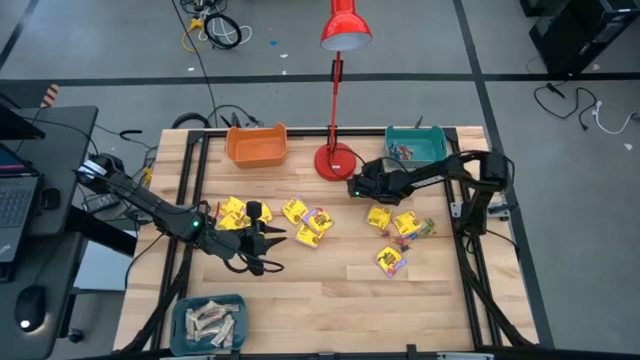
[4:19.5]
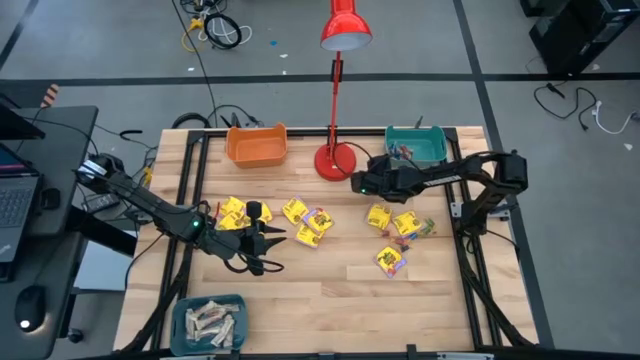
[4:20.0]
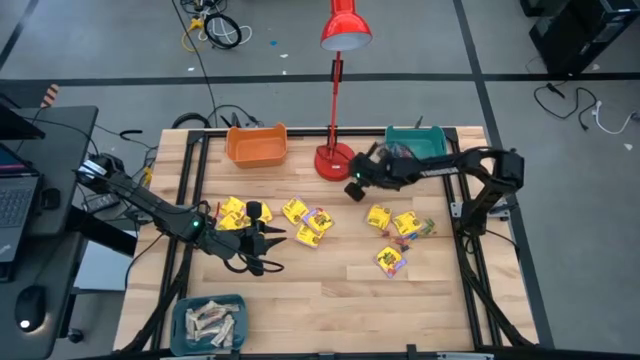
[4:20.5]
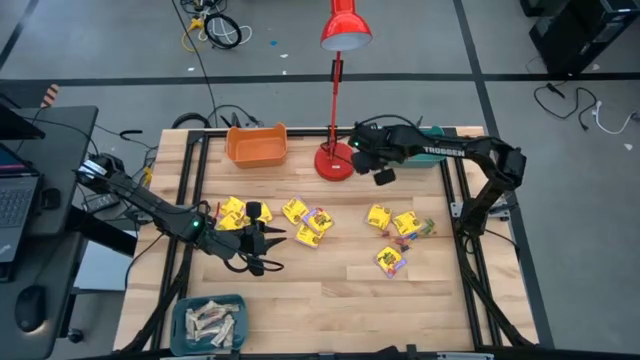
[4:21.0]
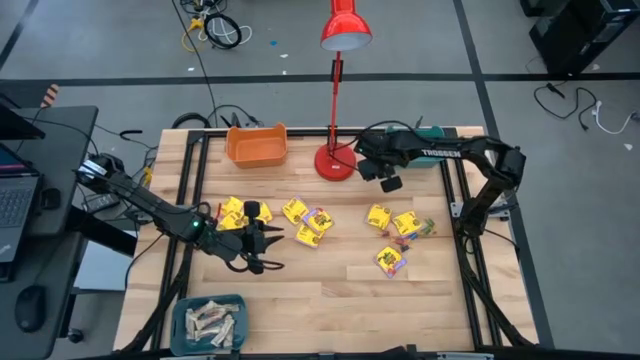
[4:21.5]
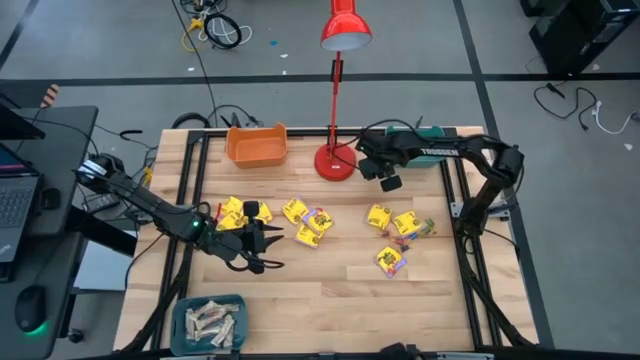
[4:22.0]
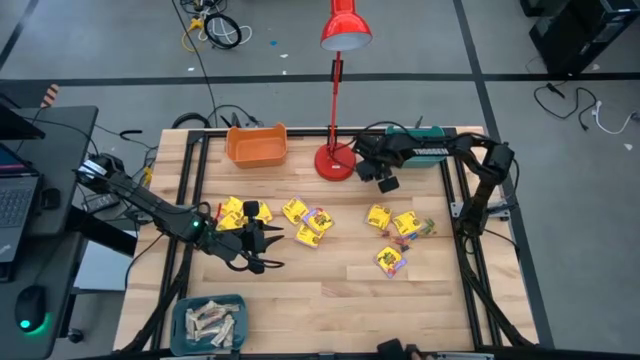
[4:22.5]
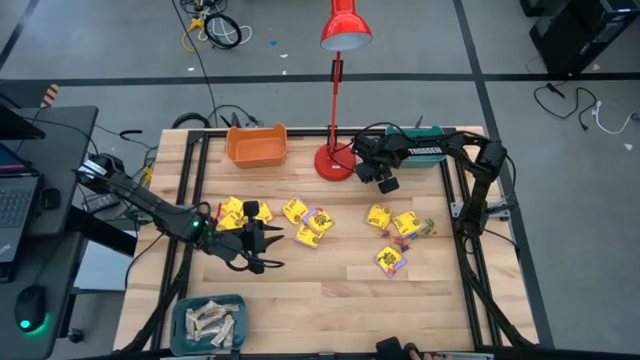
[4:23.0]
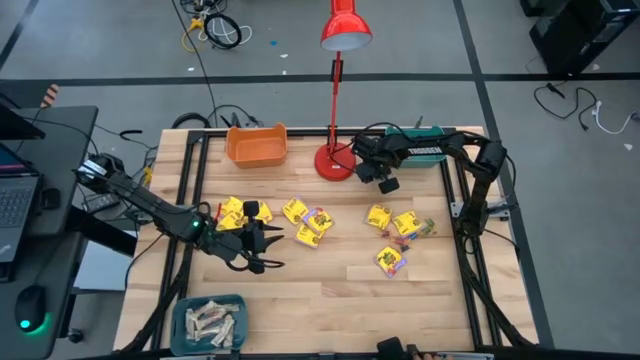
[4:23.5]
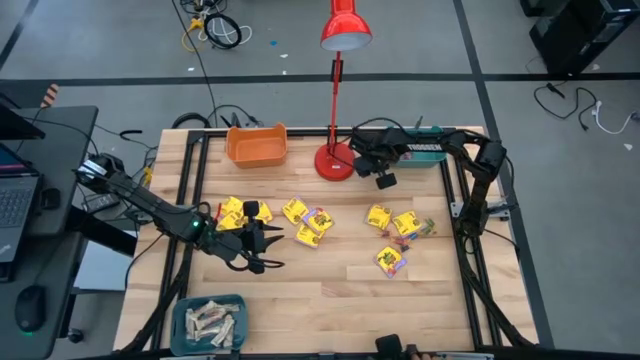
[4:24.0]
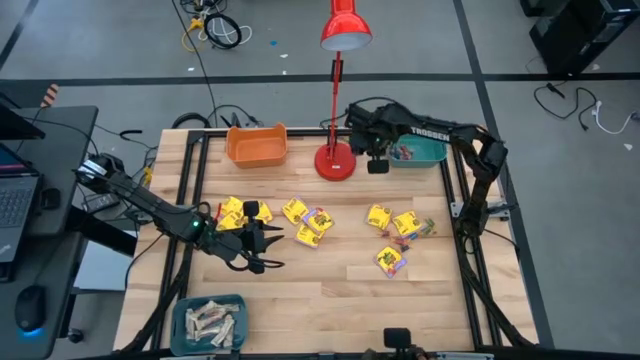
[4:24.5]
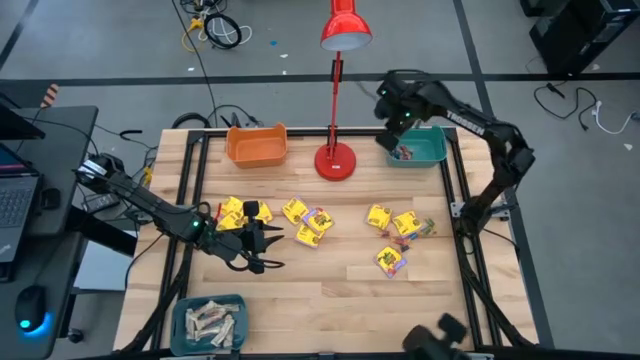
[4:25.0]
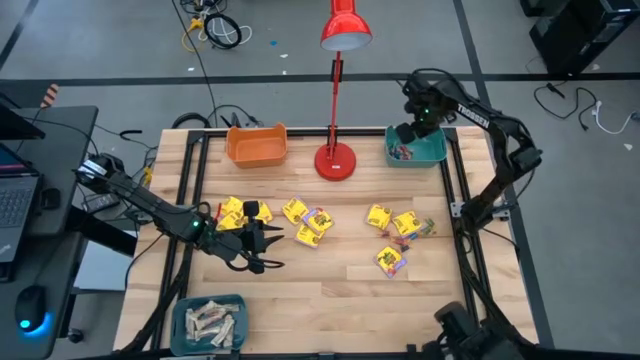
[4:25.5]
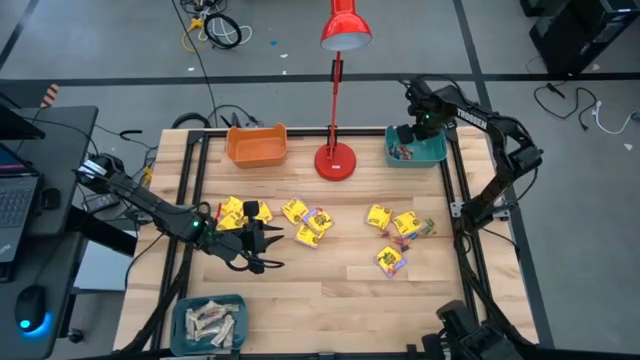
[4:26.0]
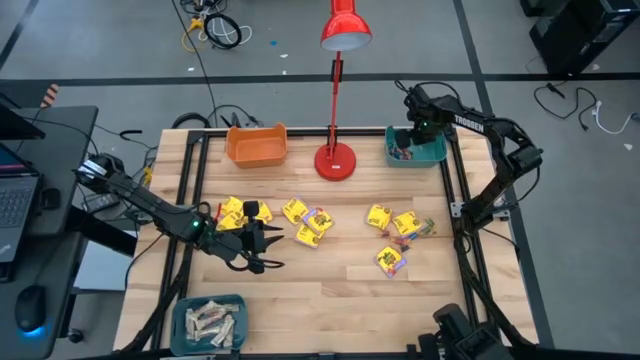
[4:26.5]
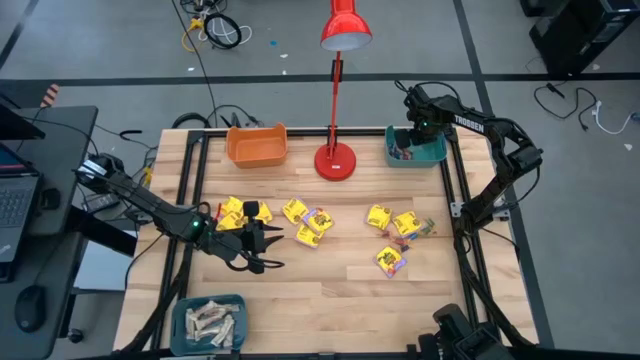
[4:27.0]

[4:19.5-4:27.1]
Task: Sort candy
Put the small blue candy into the green bin

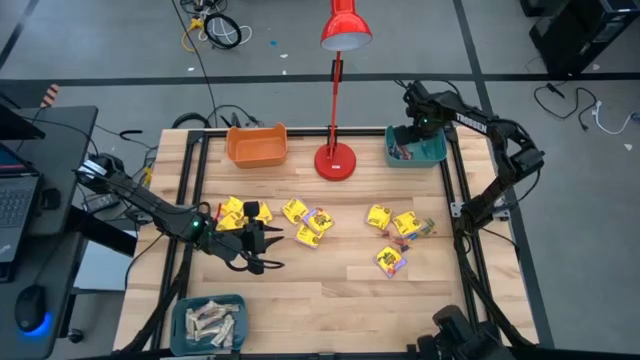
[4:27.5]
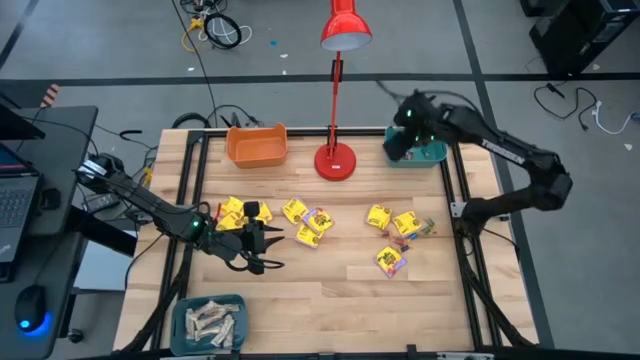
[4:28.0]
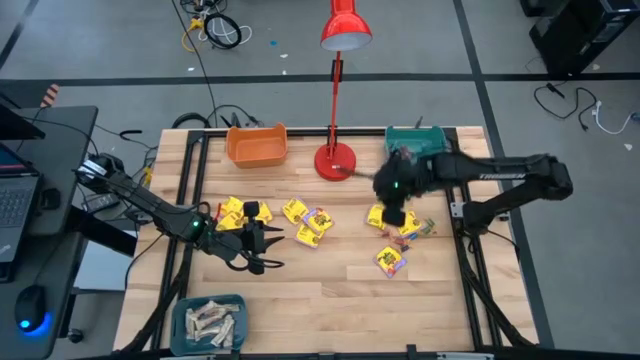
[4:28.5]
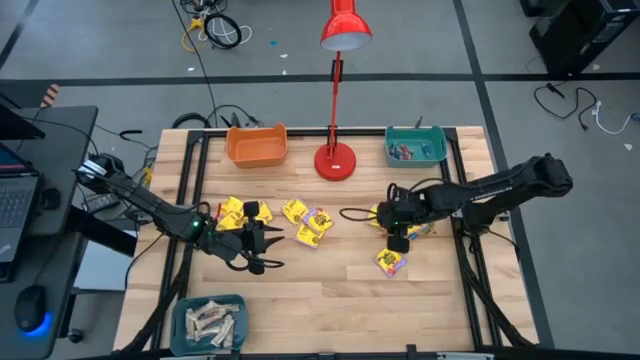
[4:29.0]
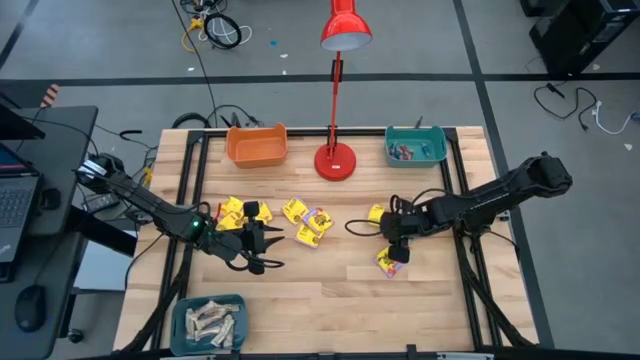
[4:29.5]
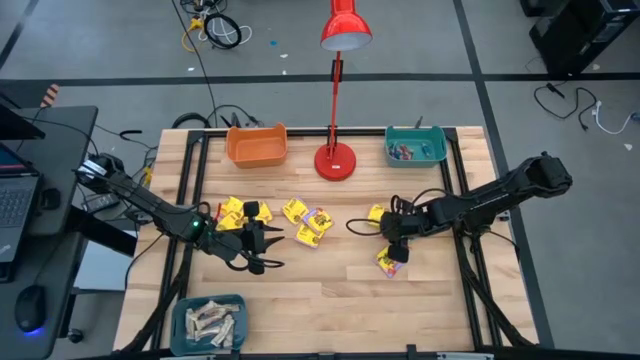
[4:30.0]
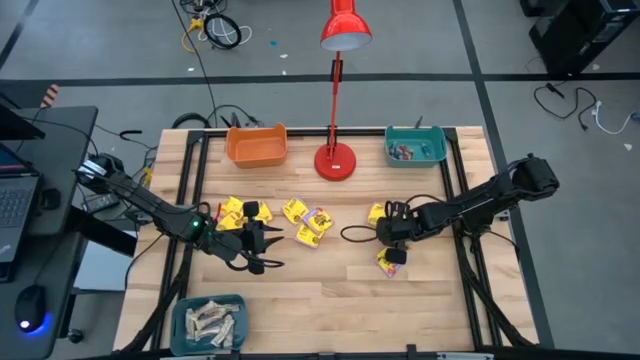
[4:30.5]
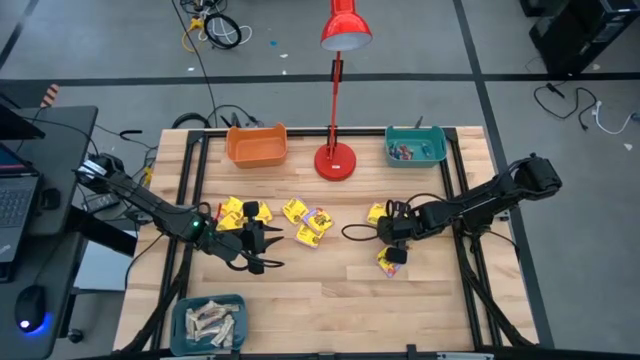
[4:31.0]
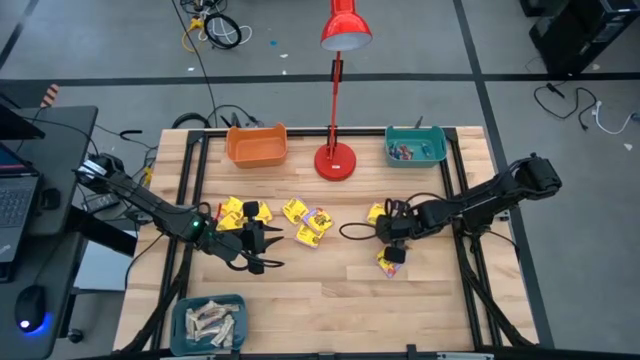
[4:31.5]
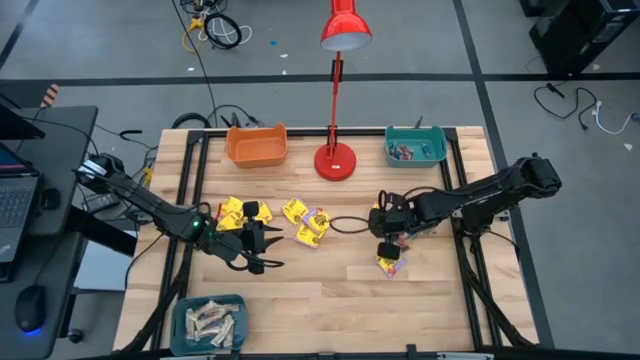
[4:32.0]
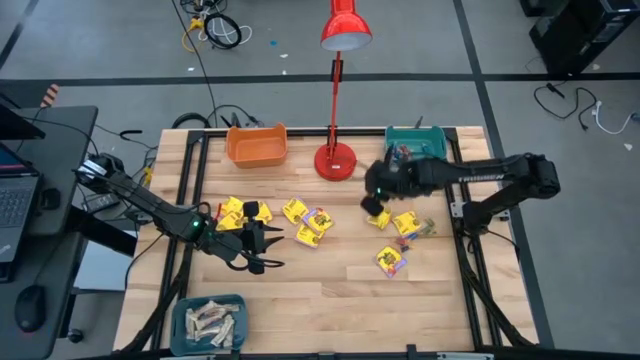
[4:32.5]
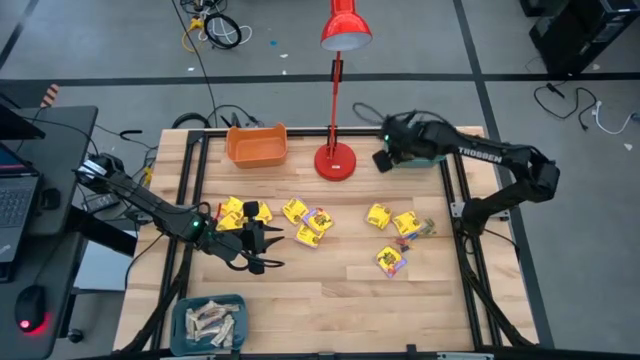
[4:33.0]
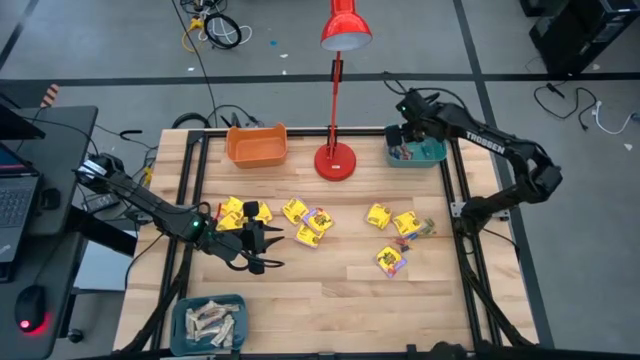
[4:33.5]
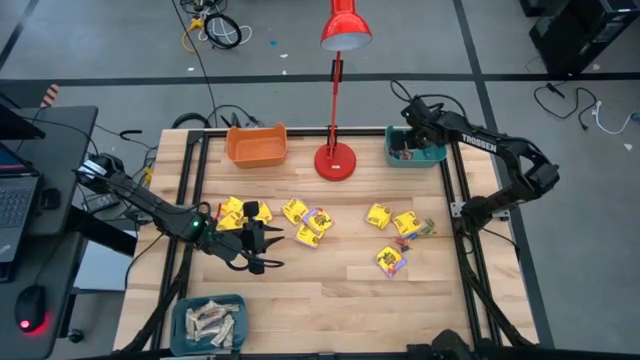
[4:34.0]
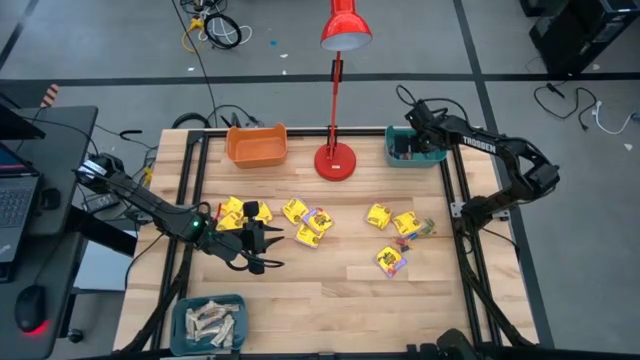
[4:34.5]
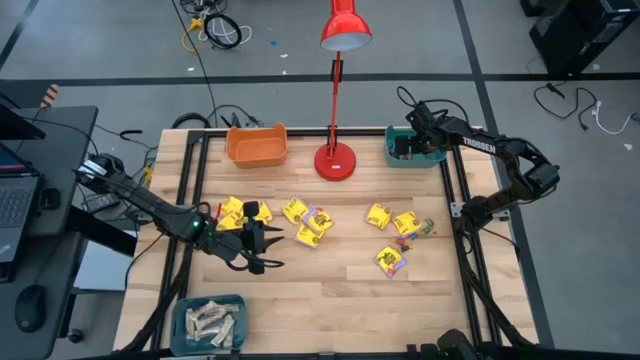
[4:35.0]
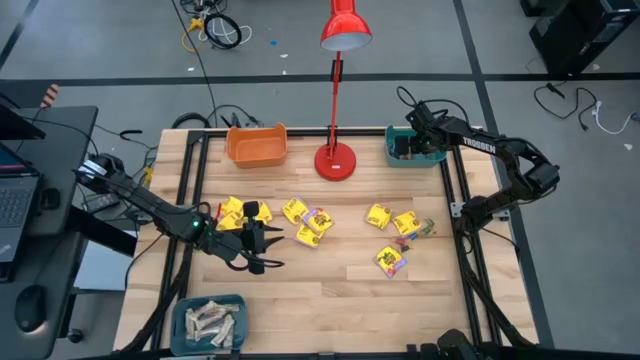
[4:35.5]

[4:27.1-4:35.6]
Put the small red candy into the green bin

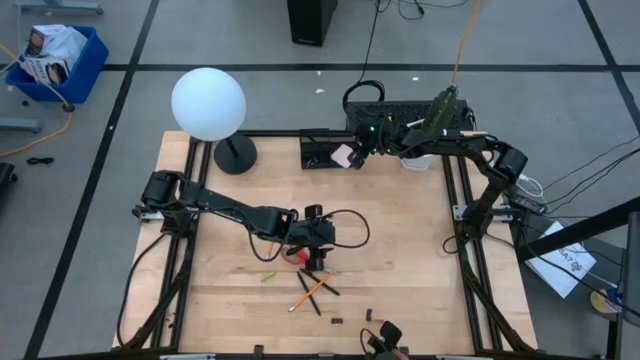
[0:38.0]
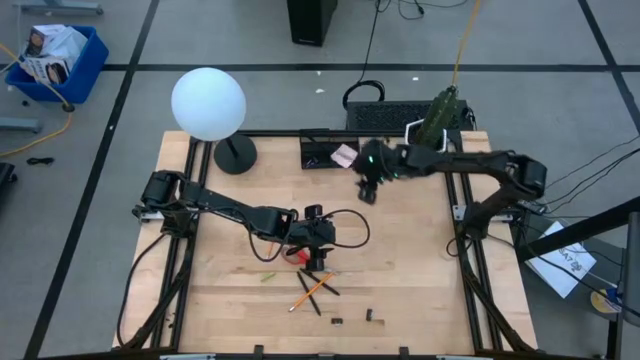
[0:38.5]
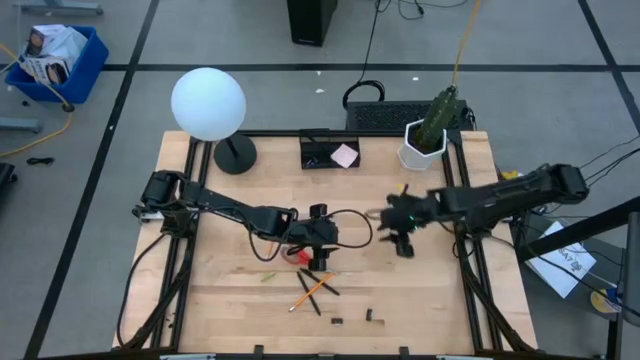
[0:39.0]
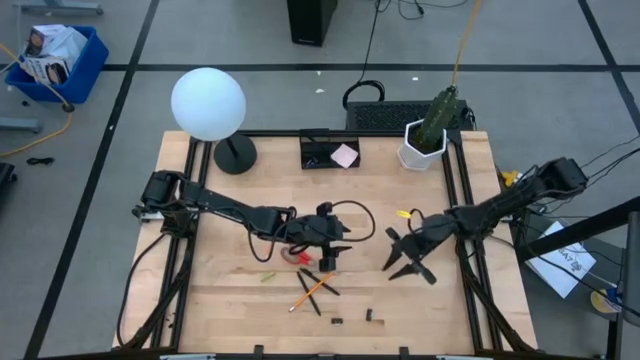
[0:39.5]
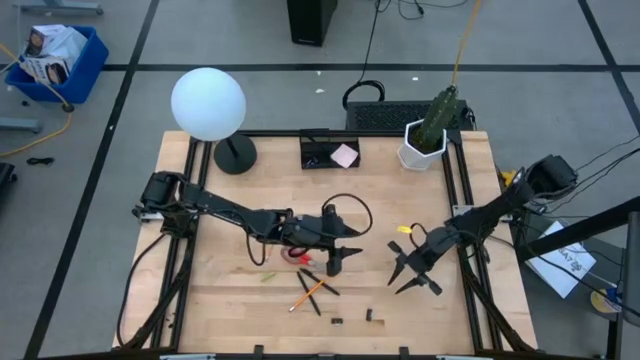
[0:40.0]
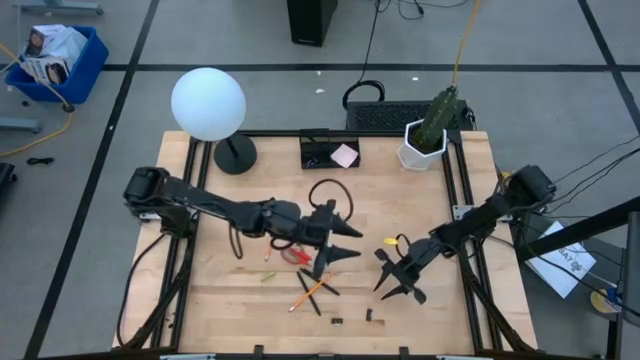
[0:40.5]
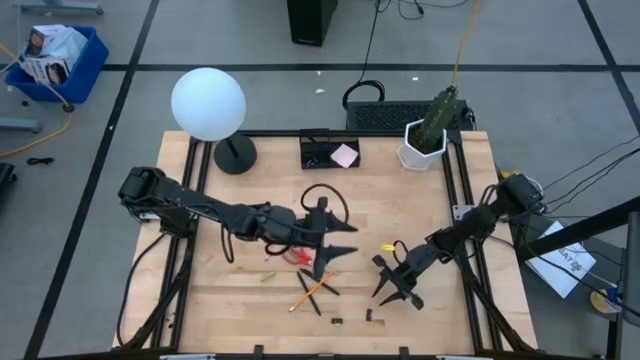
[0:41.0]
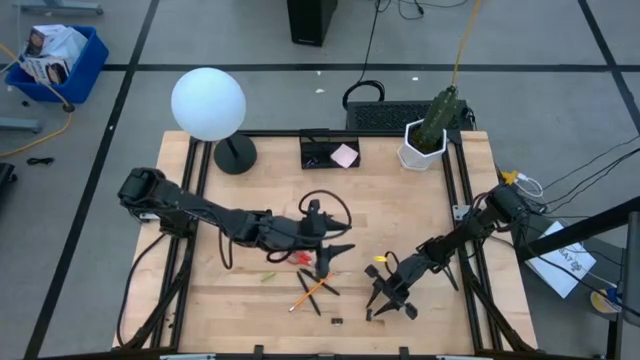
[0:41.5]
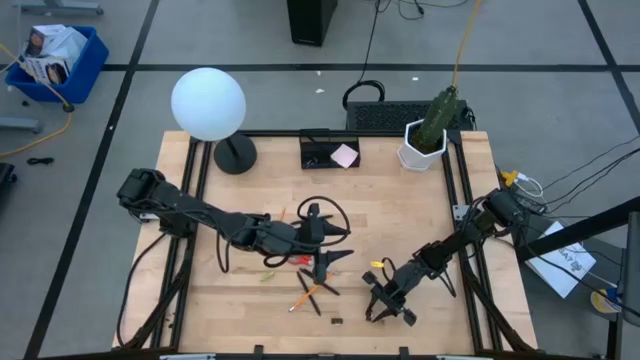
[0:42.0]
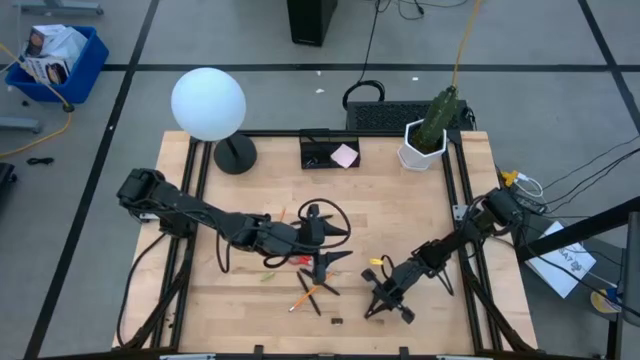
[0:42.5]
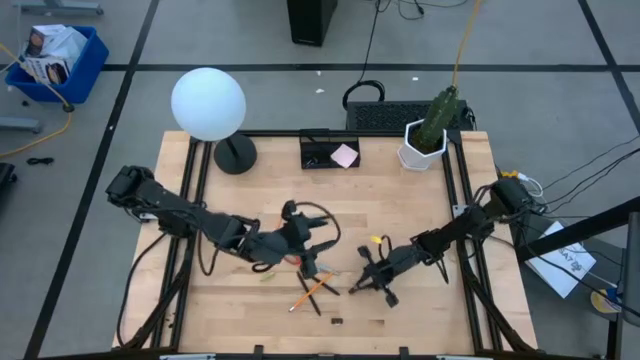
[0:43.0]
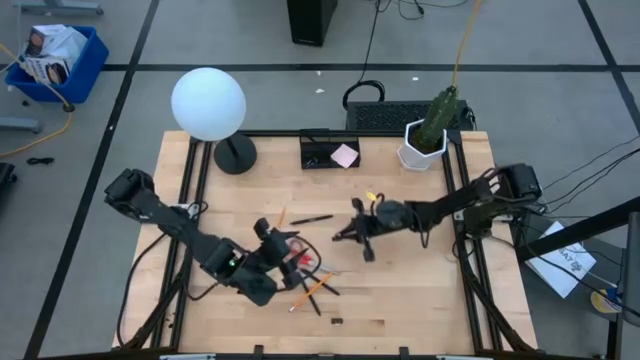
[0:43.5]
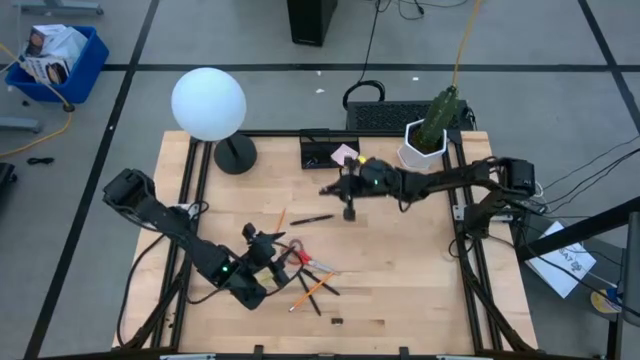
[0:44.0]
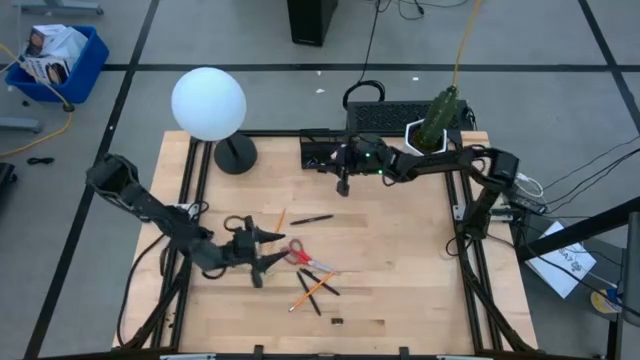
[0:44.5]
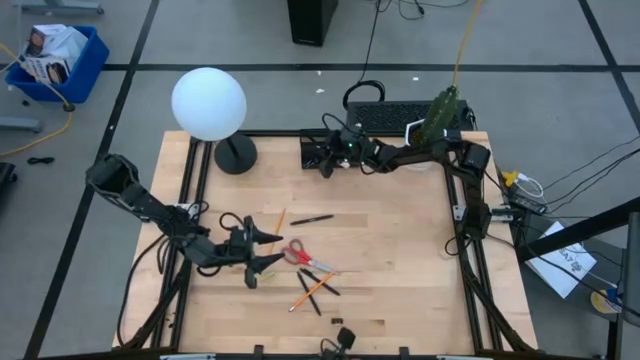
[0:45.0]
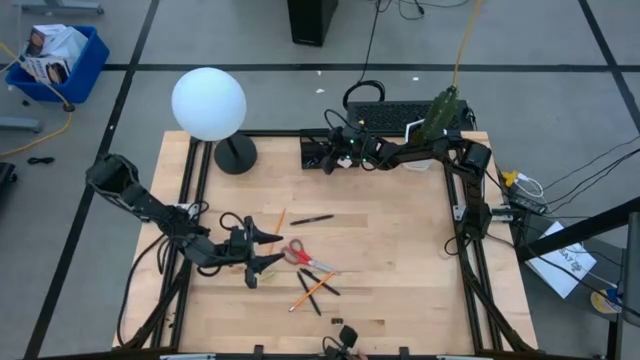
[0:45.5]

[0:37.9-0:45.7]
Task: Pick and place office supplies into organizer
Put the binder clip into the desk organizer
